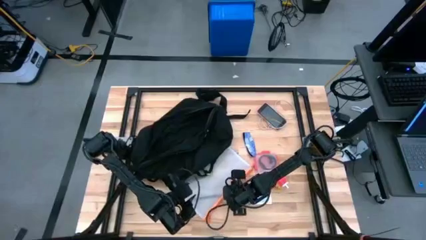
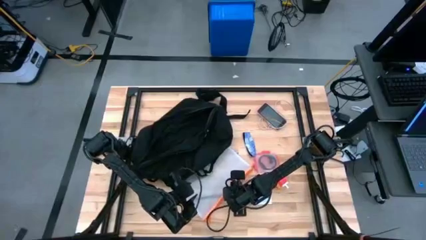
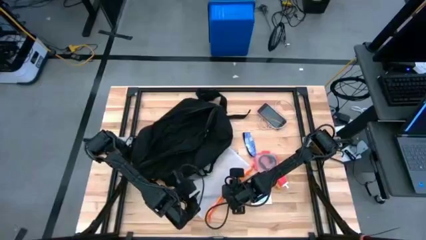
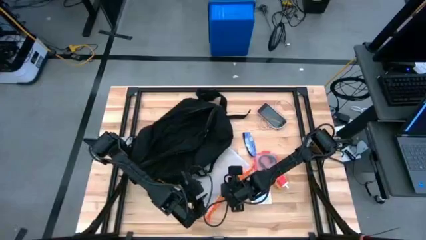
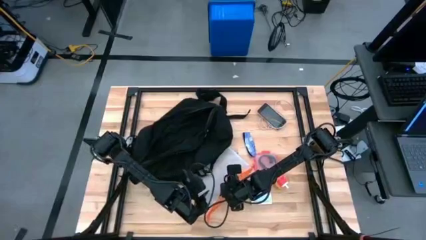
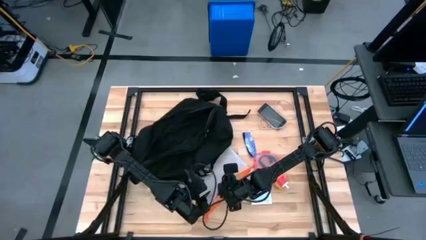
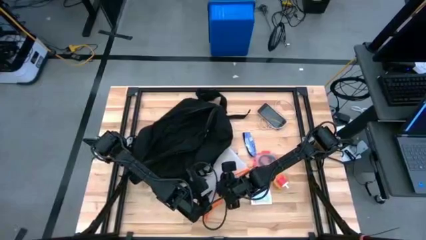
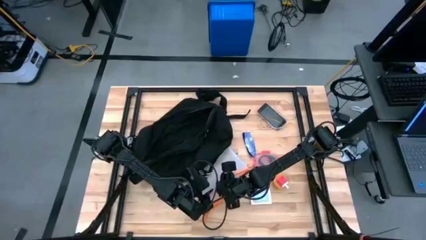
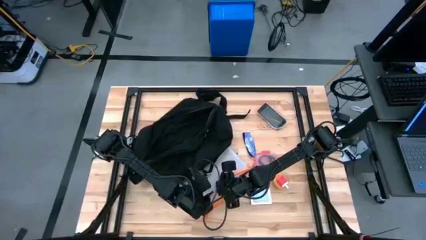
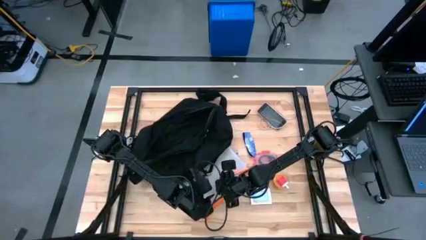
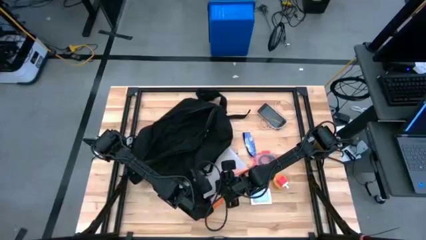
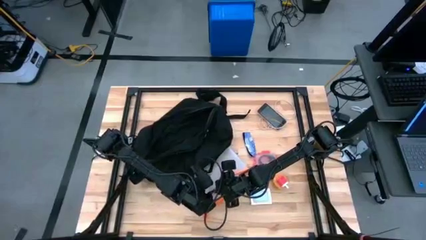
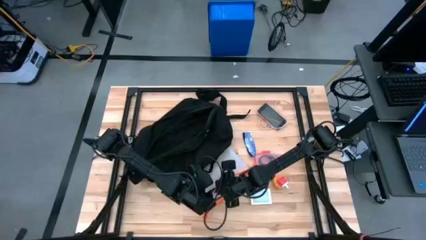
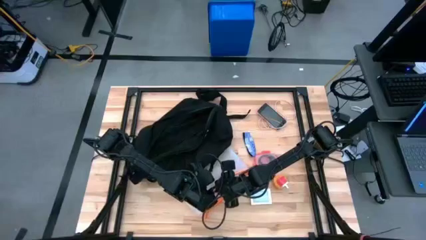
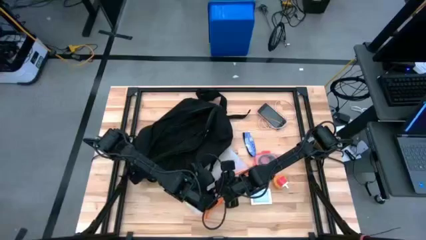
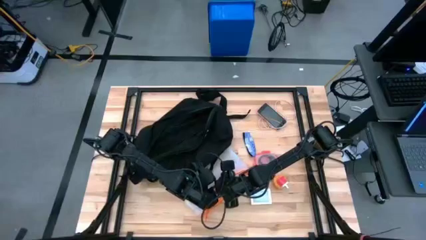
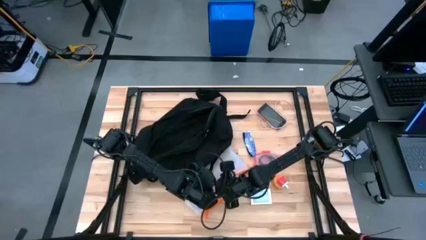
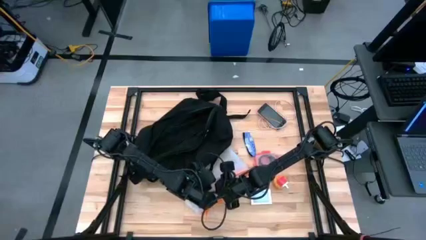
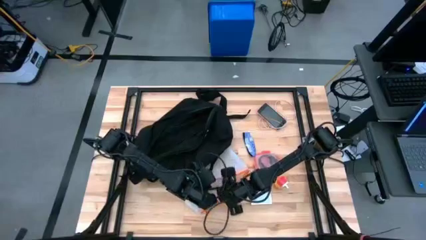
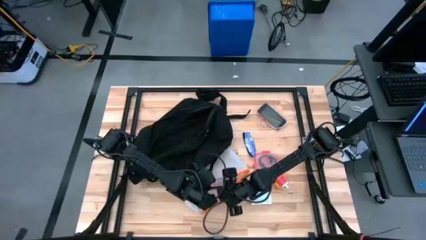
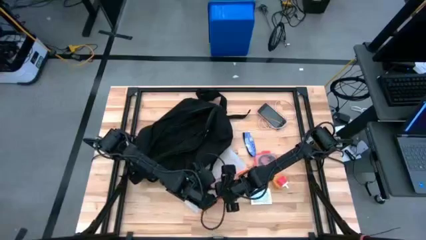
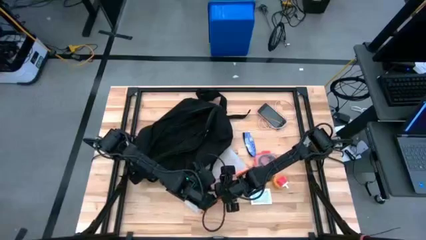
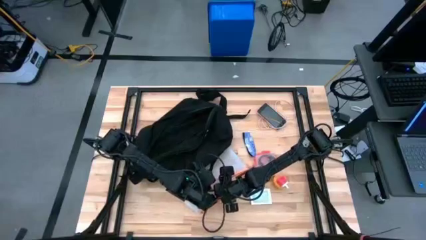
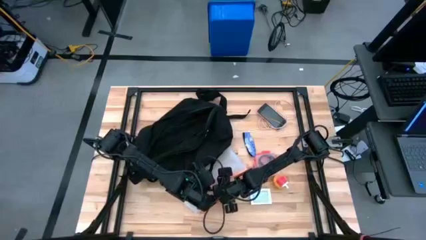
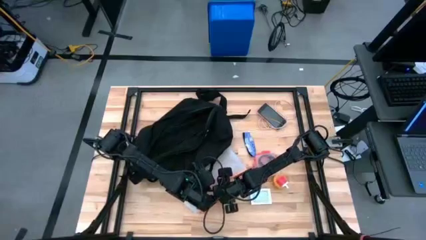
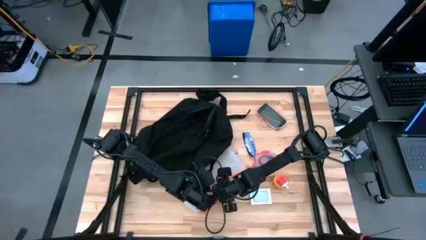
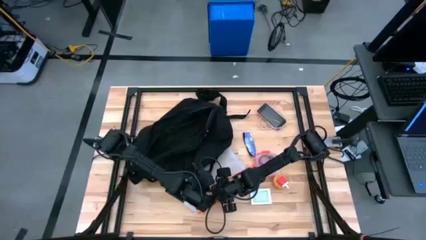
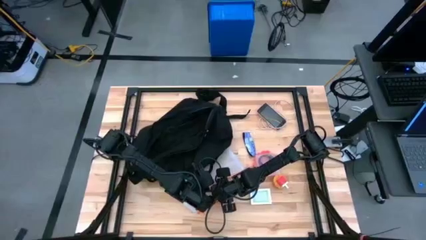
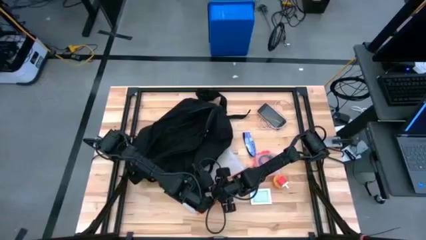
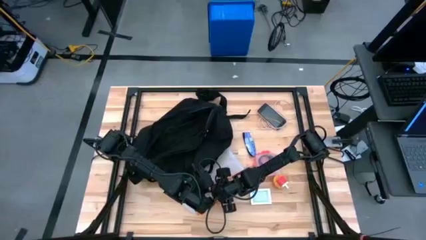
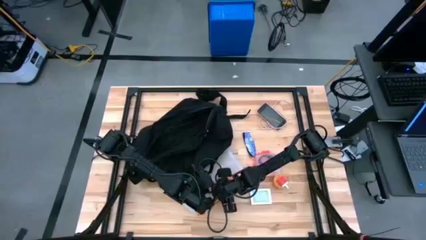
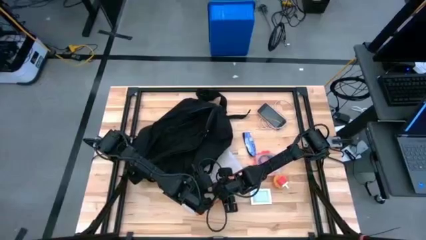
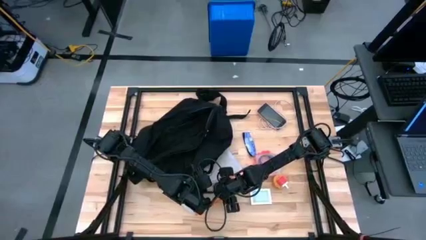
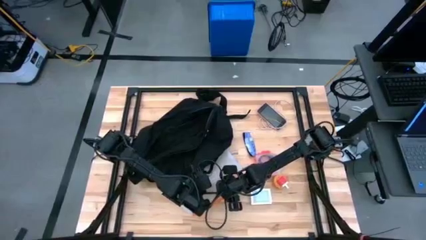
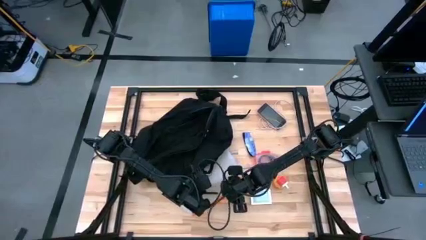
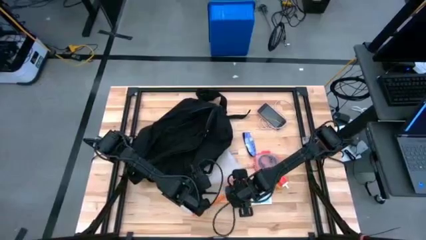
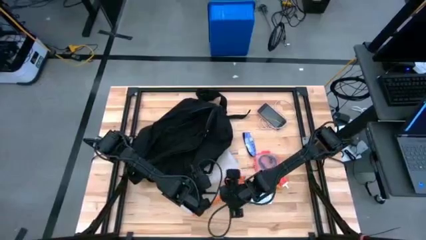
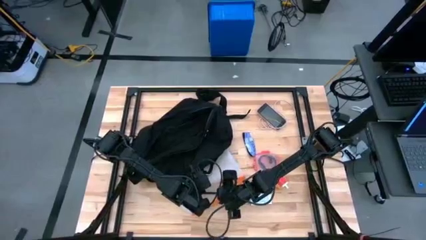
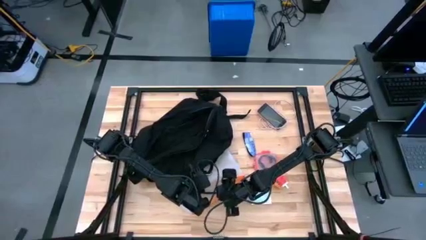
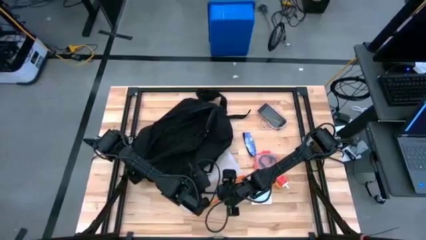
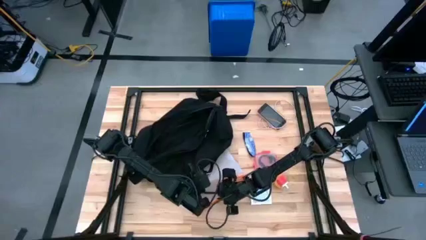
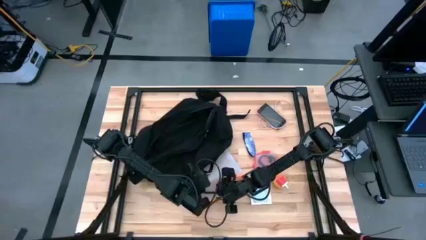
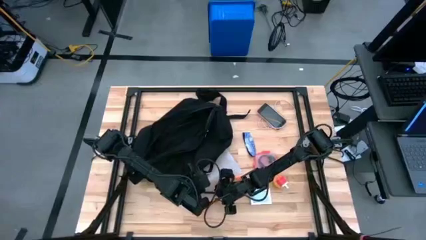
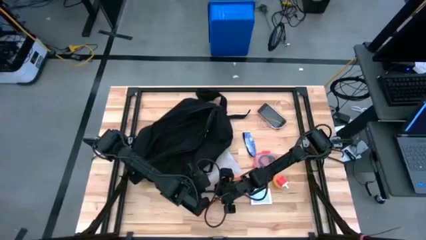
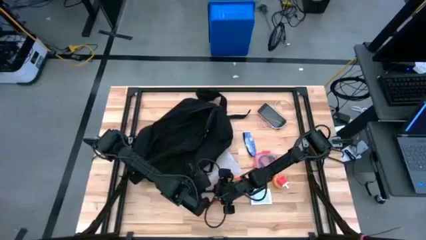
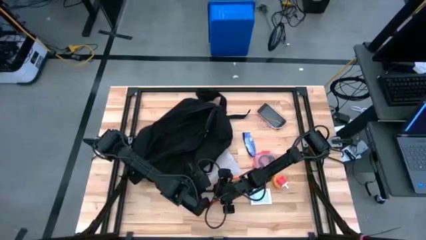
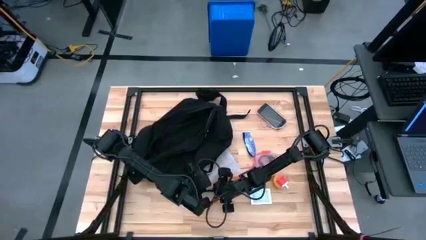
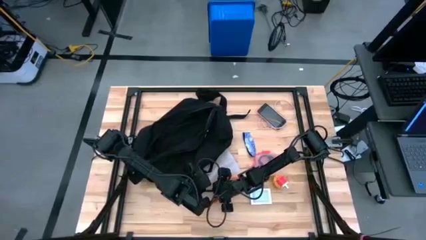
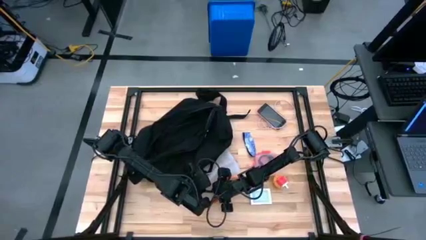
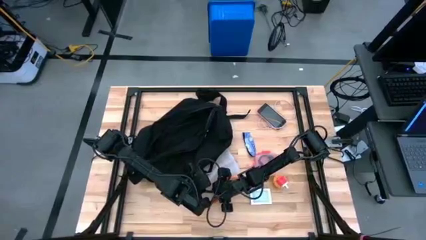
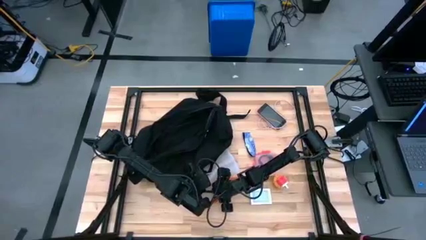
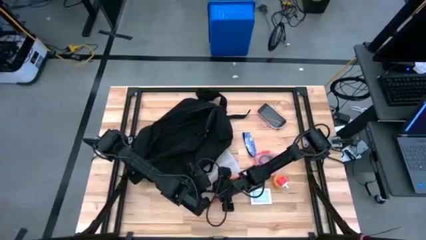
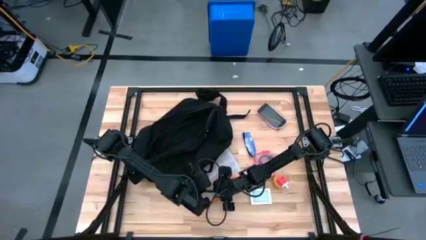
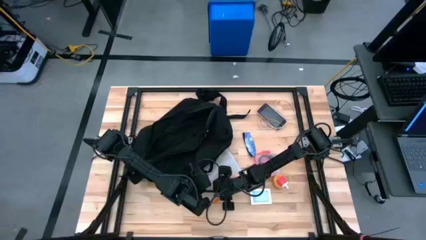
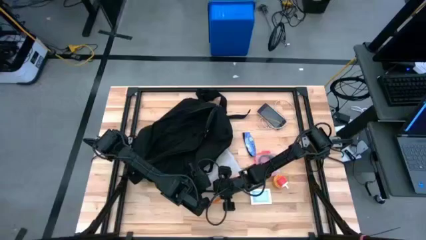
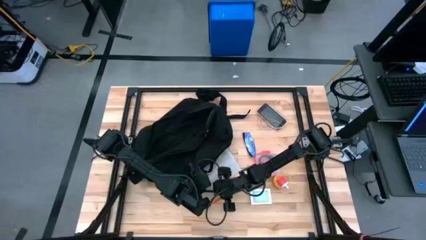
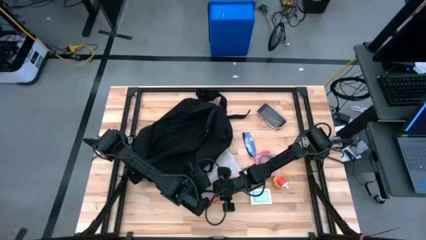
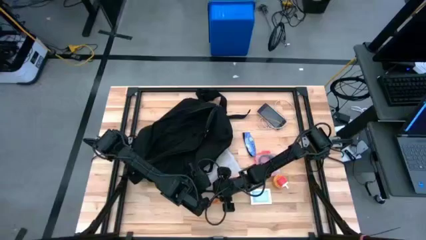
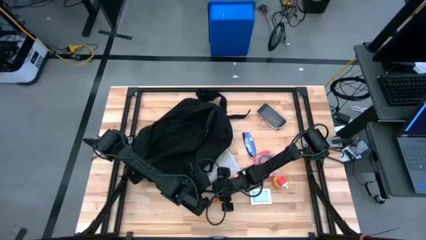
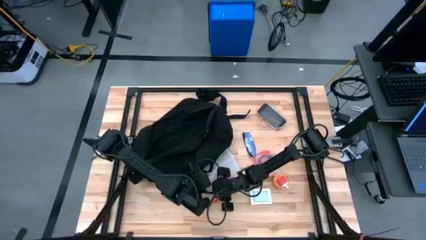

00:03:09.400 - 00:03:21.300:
Task: Unpack backpack
Remove the black pen from the orange zip bag

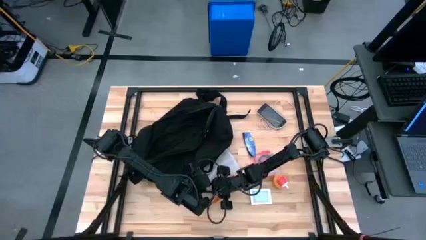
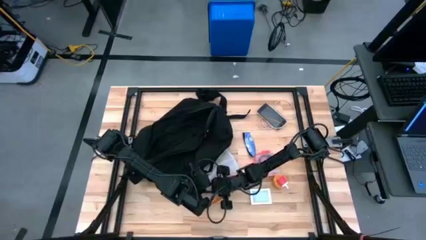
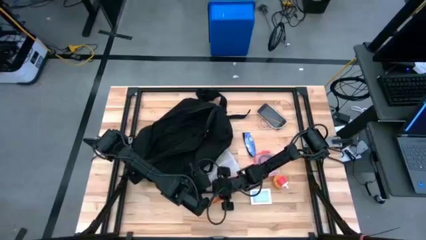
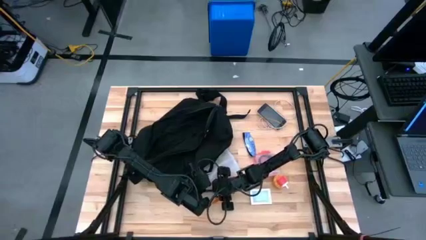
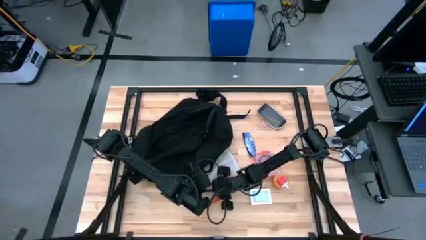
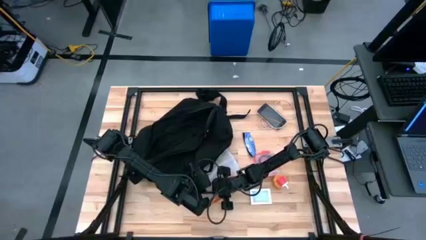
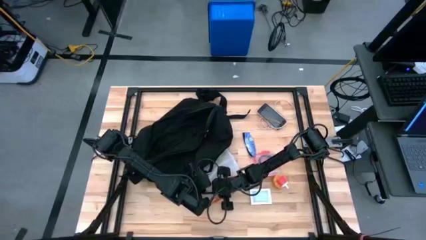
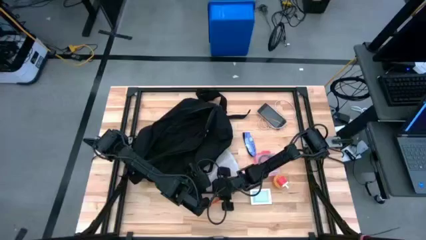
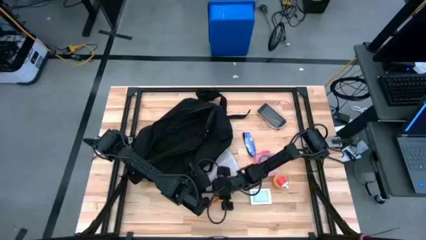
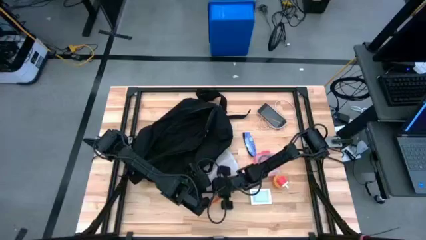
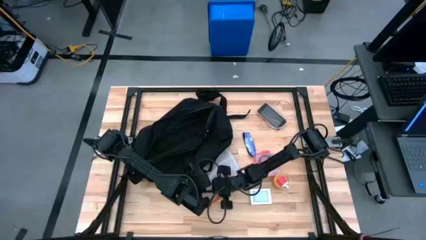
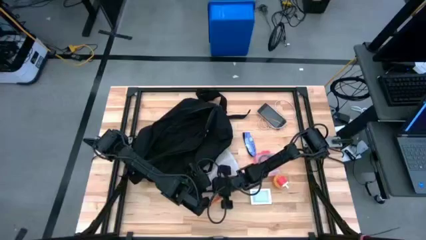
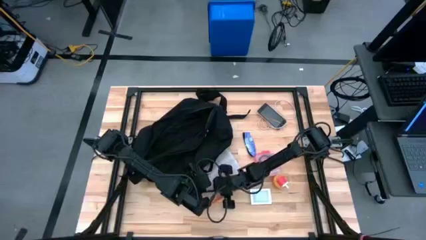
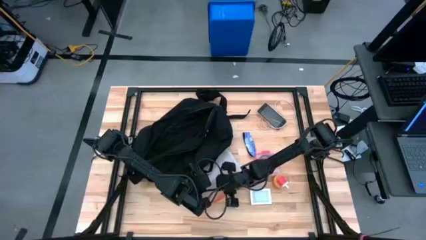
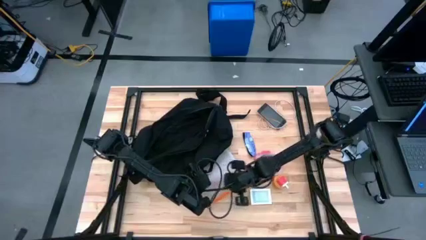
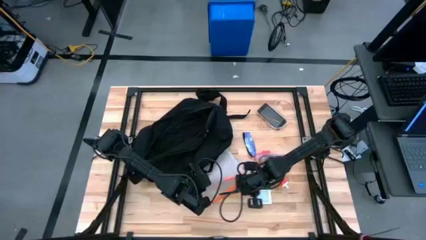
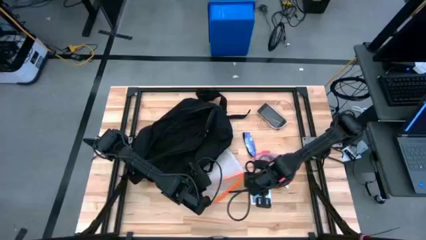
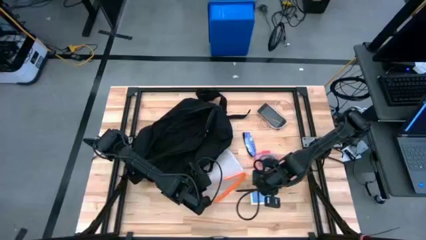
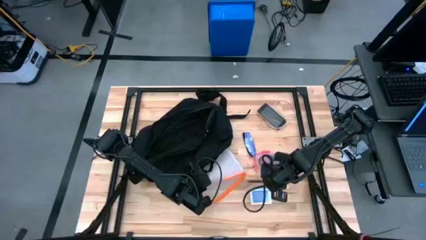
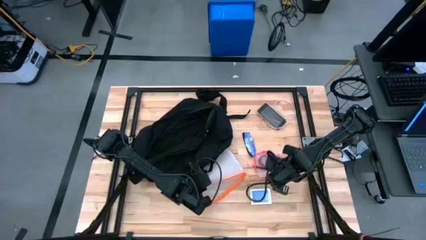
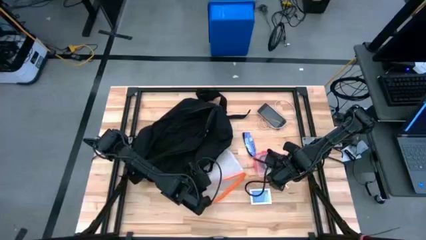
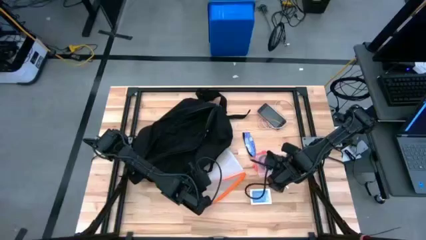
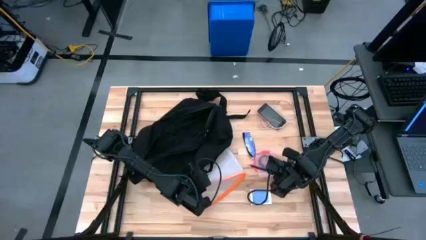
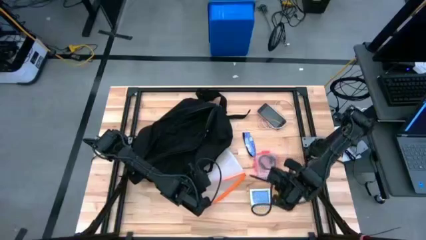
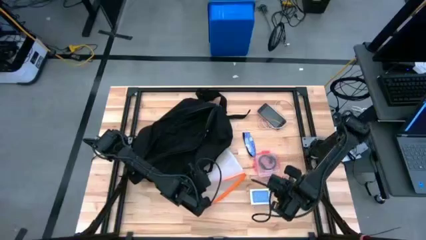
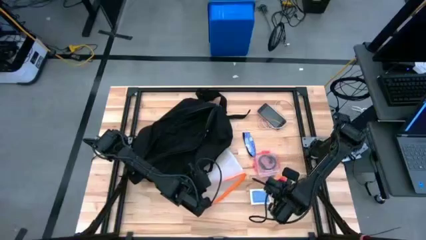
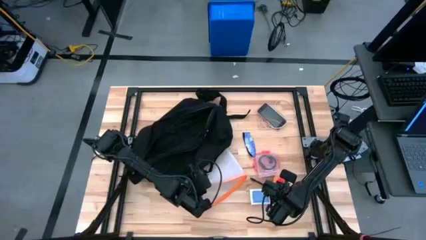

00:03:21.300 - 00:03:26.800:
Remove the black pen from the orange zip bag
